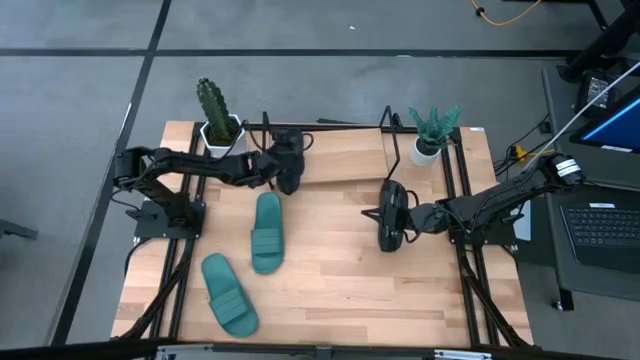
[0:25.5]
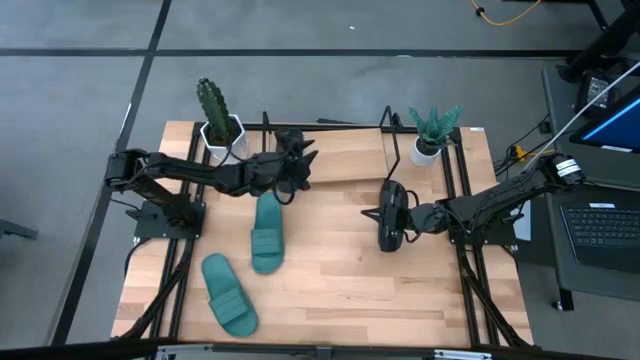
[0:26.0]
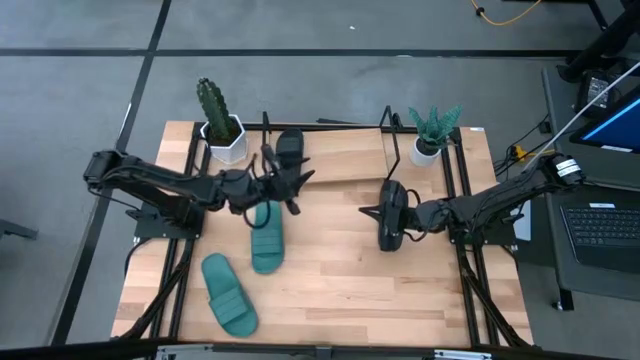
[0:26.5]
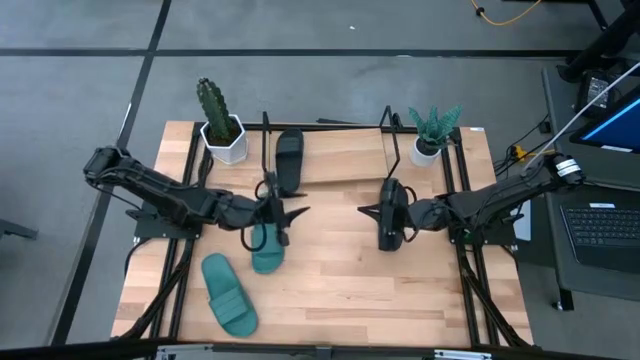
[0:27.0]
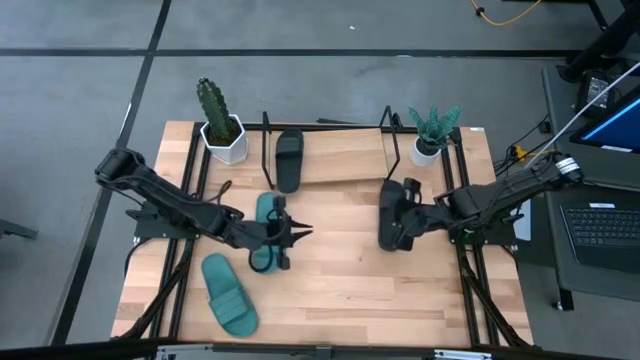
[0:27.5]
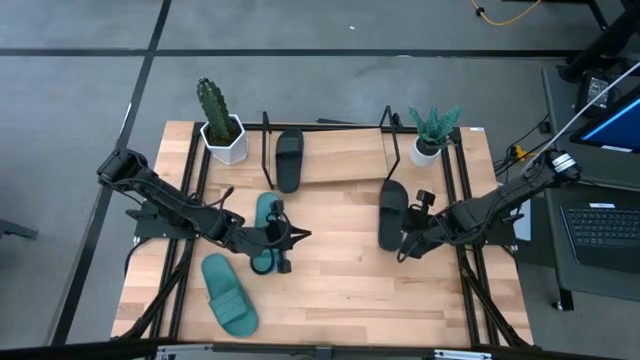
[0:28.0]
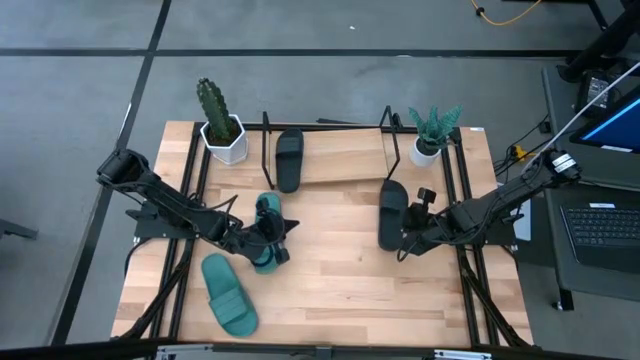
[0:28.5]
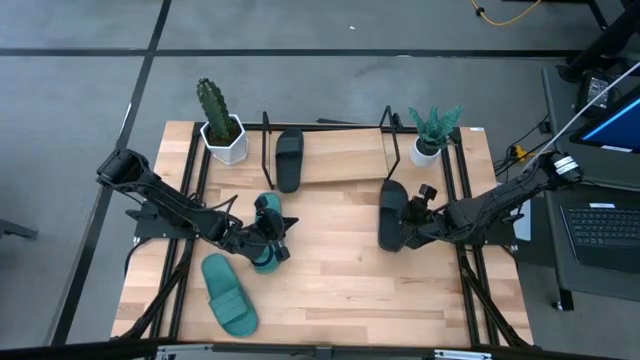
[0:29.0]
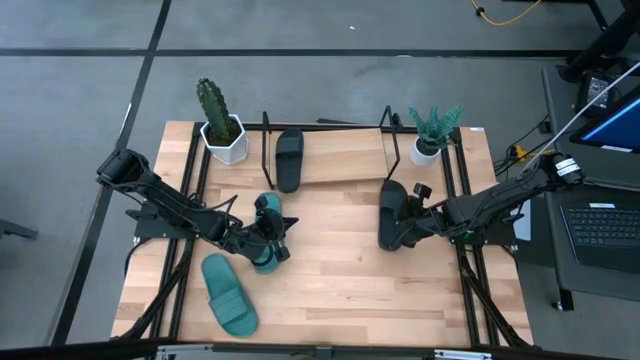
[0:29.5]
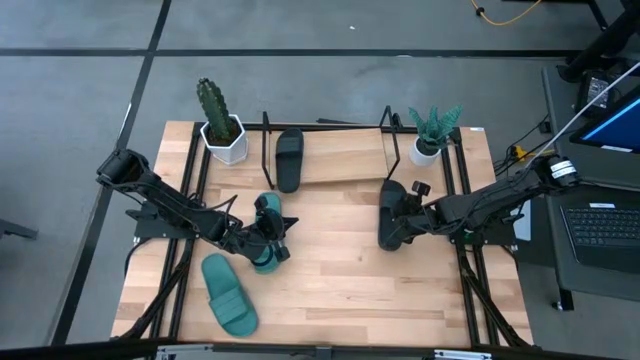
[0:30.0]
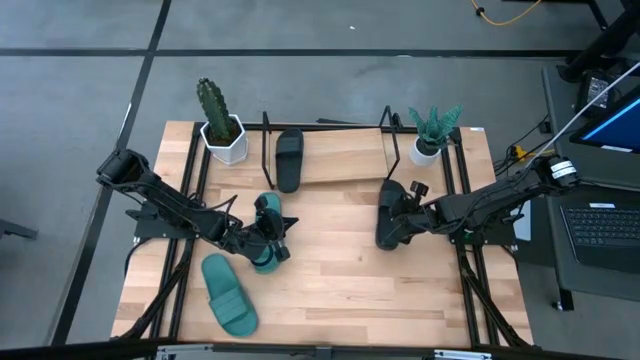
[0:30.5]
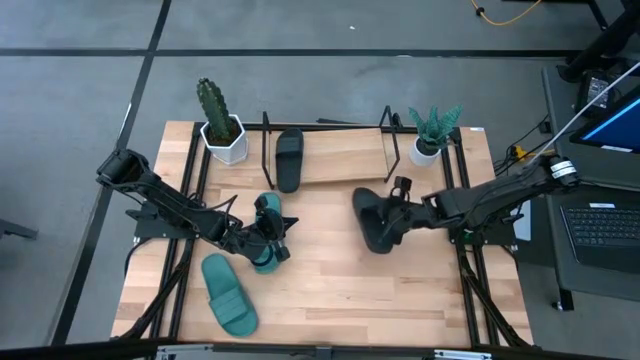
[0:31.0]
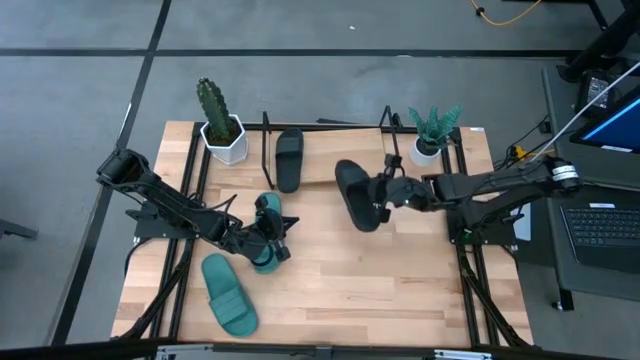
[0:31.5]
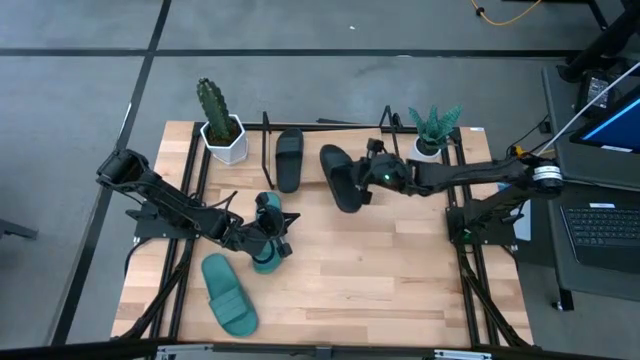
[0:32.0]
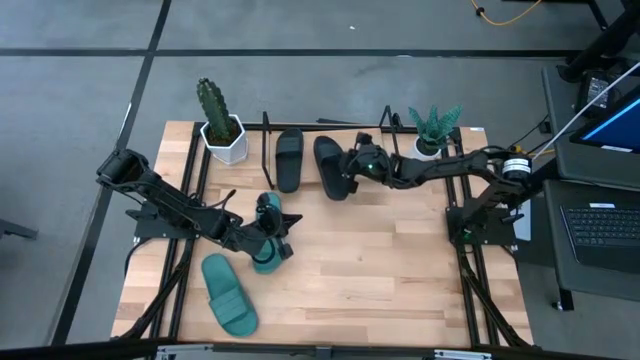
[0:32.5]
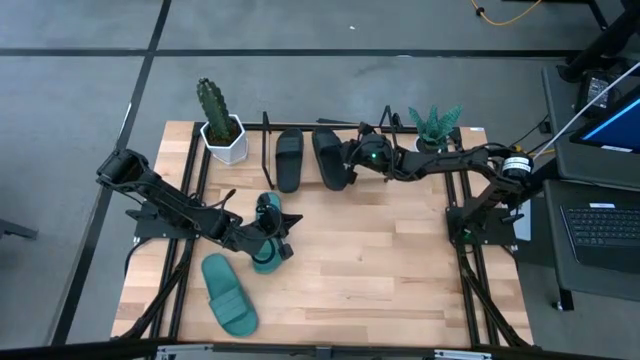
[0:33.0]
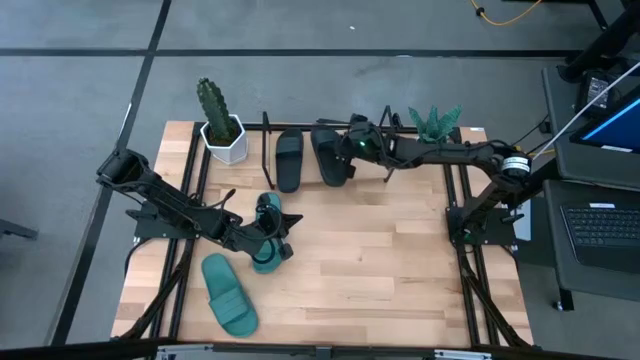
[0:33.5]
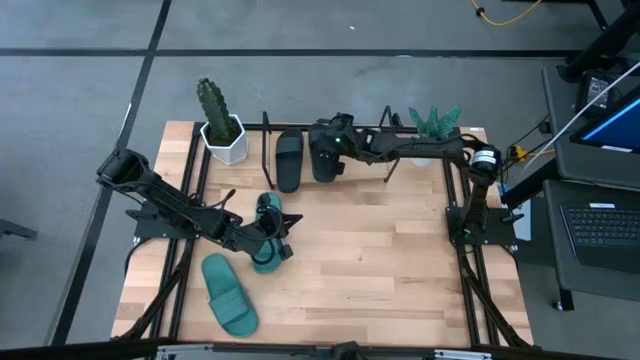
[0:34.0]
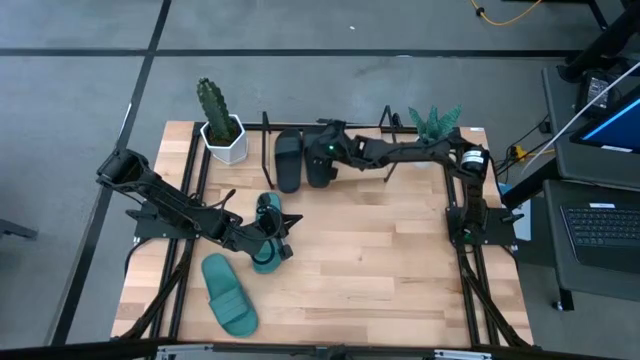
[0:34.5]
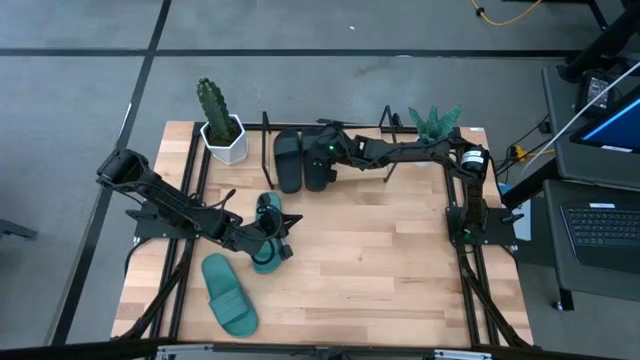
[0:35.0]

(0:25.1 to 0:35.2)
Task: Pick and place slides into the shelf
Put the black slide on the shelf

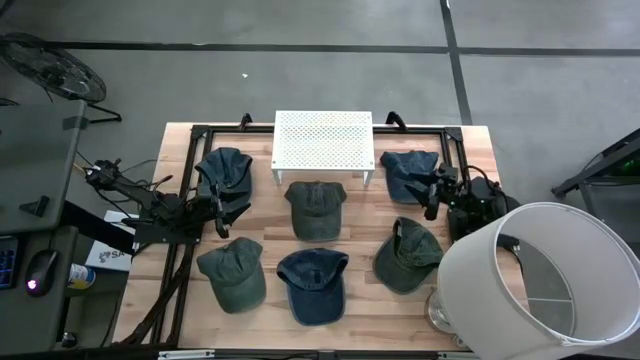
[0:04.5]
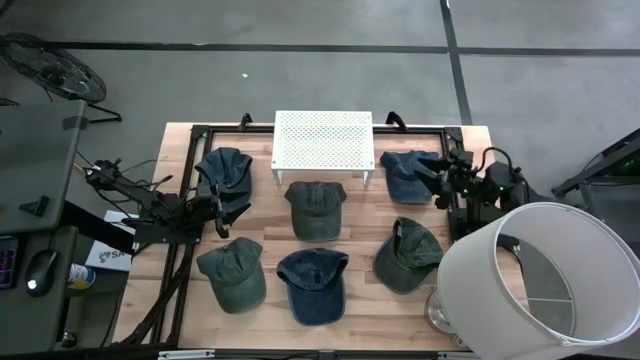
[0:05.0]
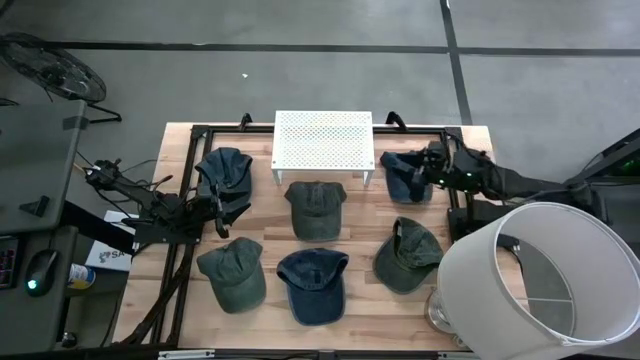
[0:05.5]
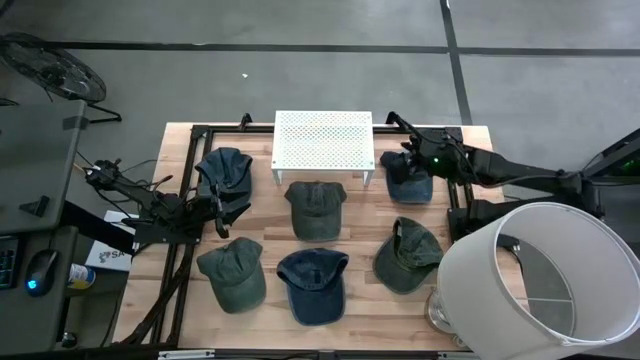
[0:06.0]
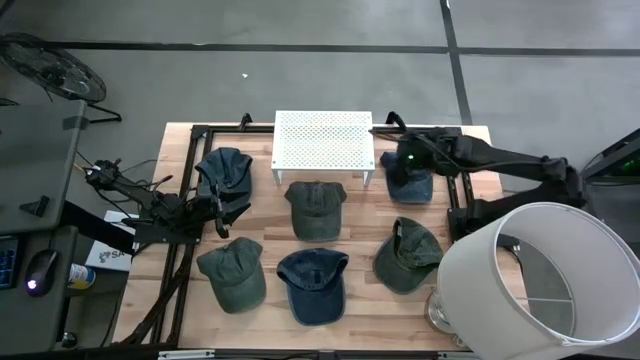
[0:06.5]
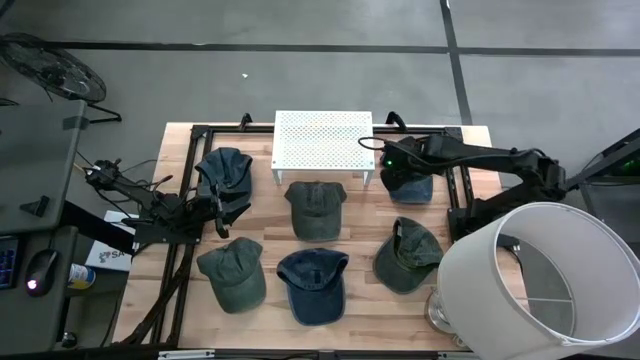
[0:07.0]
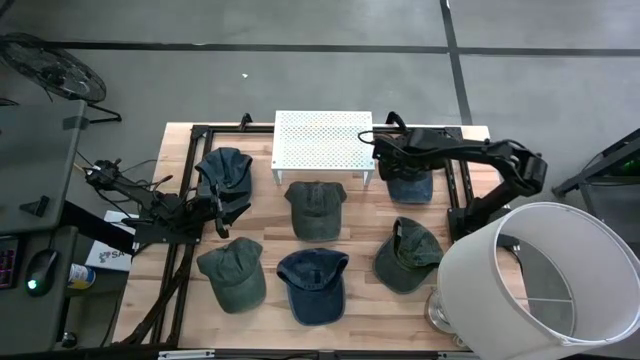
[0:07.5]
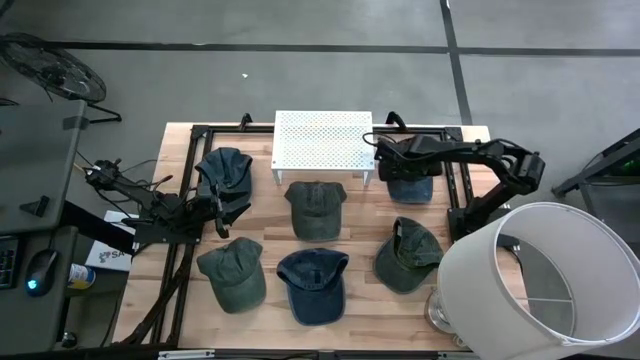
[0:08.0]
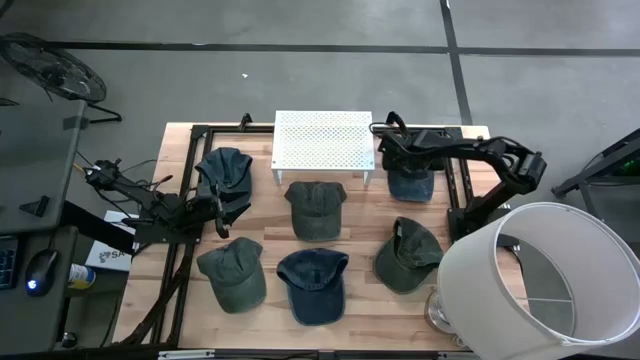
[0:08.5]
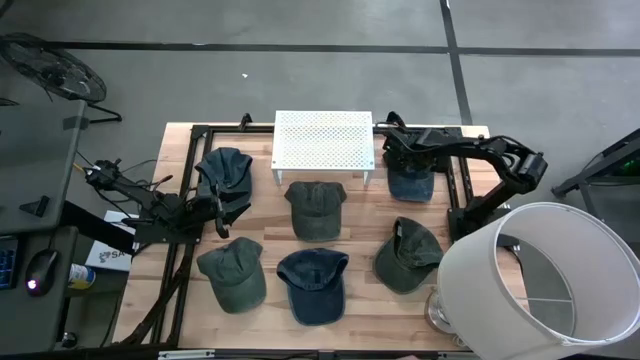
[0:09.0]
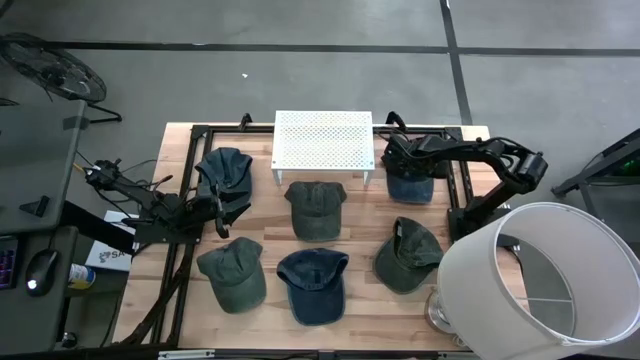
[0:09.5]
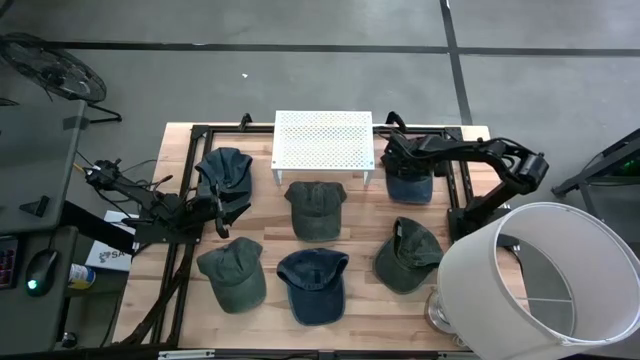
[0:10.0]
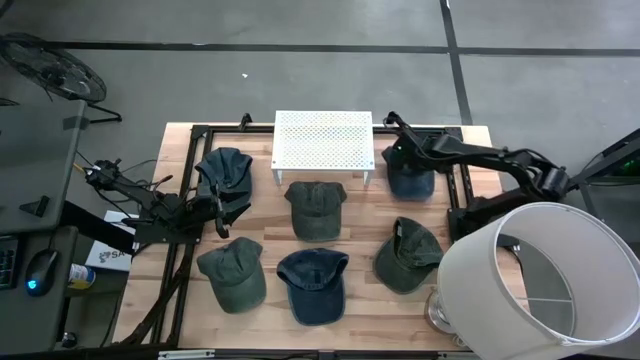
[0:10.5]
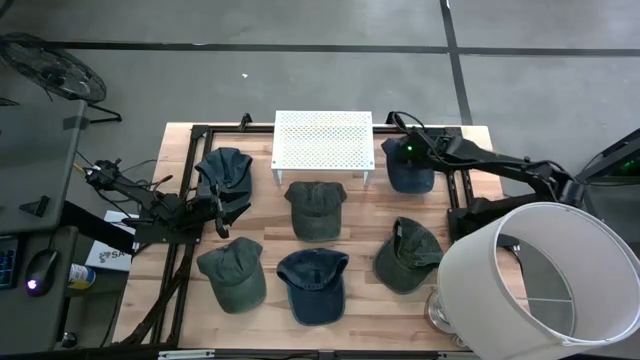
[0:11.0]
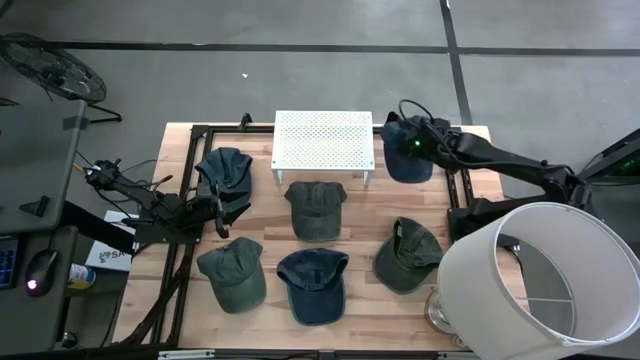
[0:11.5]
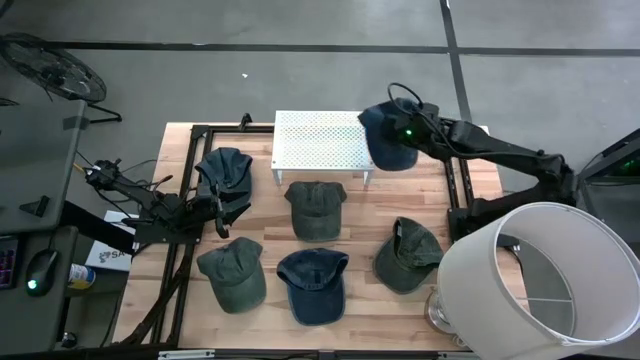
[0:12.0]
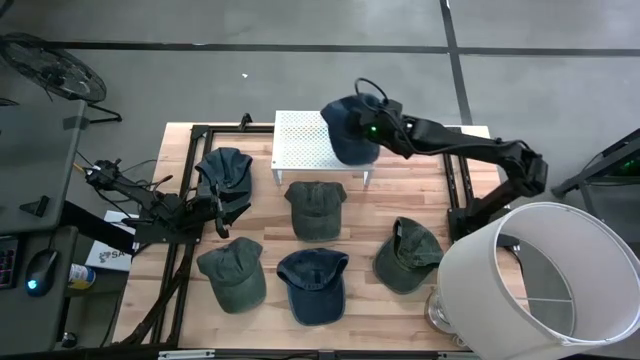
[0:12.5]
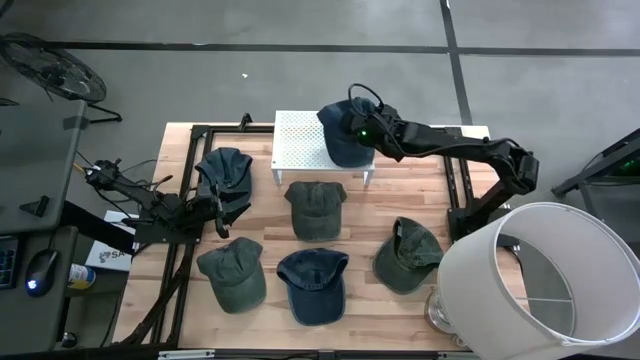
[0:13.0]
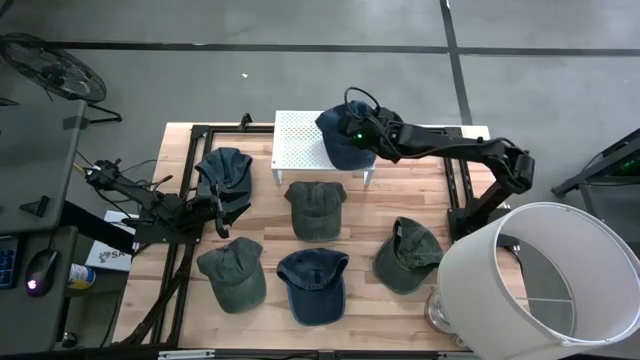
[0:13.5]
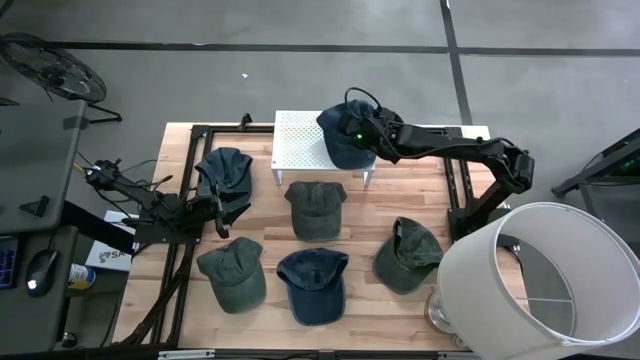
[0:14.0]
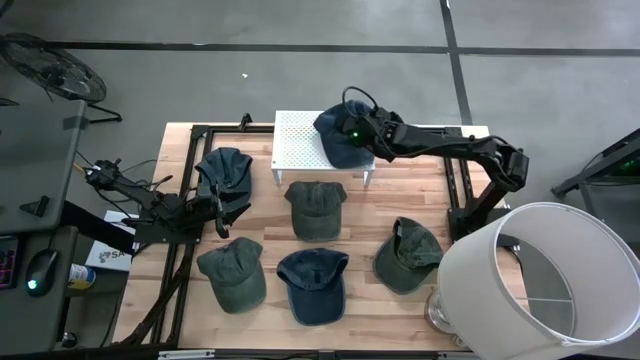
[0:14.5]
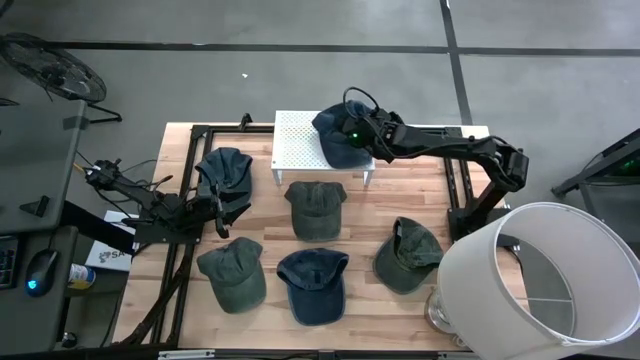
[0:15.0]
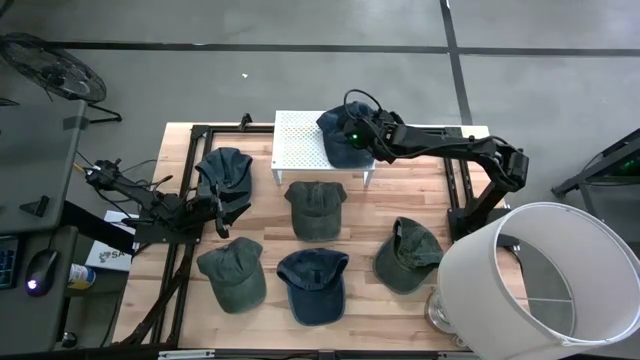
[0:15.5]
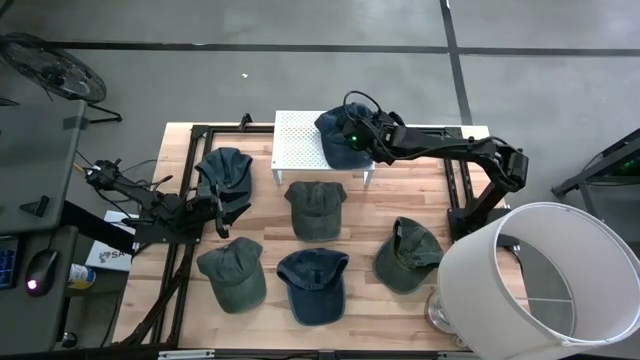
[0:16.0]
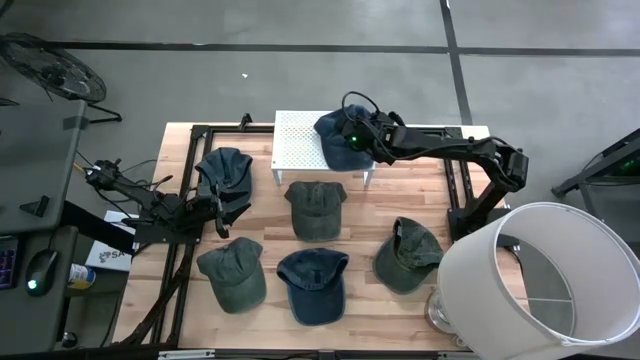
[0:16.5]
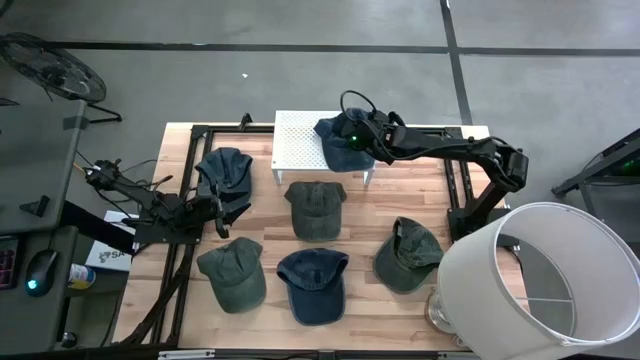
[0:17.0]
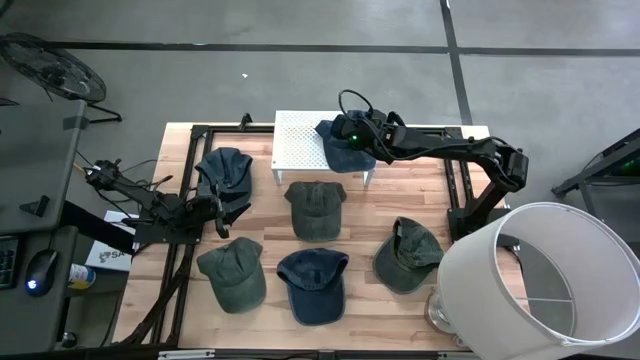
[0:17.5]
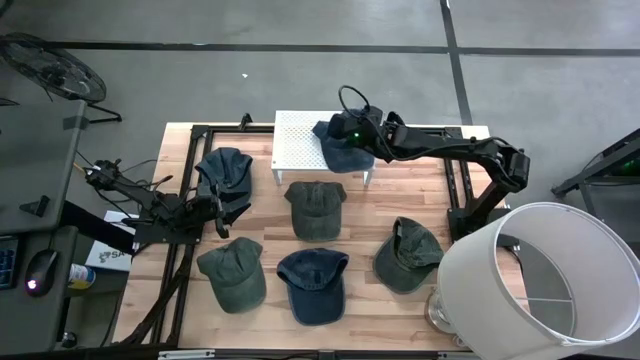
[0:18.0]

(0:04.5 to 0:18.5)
Task: Pick & Place hat
Put the top right blue cap on the shelf
